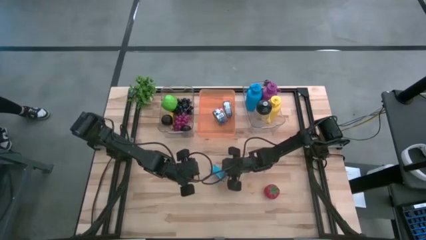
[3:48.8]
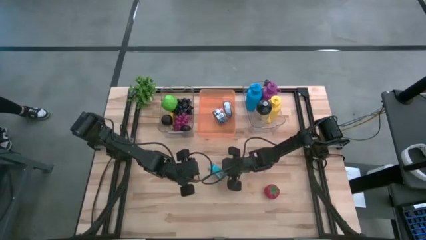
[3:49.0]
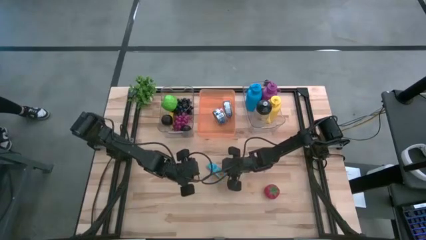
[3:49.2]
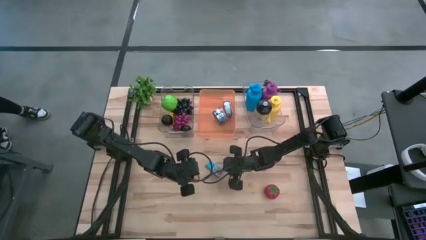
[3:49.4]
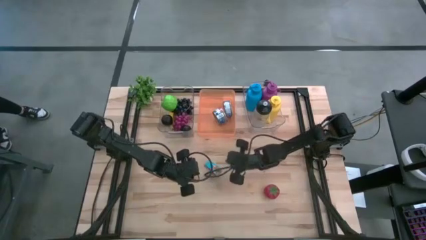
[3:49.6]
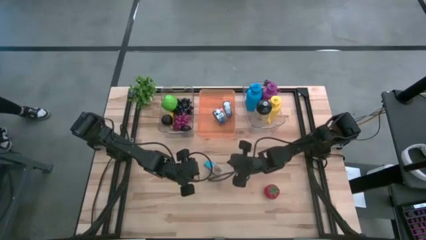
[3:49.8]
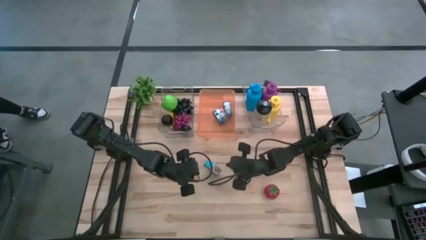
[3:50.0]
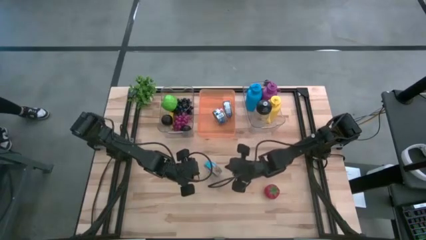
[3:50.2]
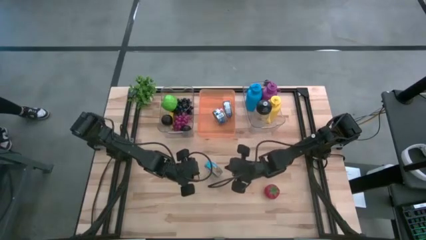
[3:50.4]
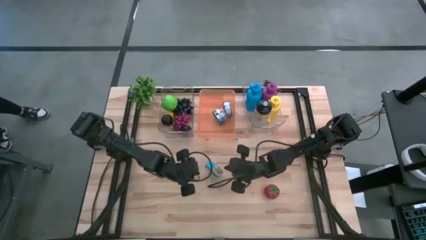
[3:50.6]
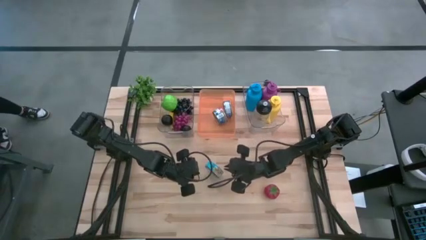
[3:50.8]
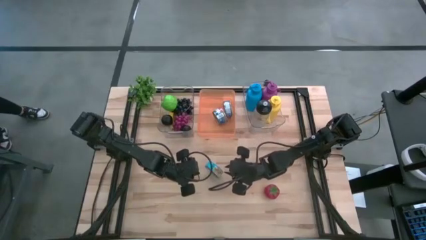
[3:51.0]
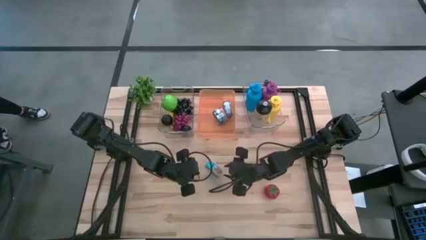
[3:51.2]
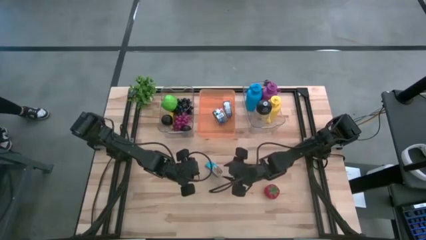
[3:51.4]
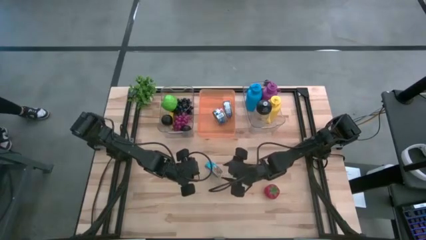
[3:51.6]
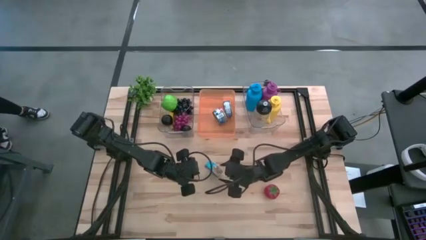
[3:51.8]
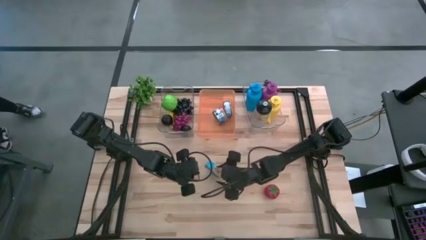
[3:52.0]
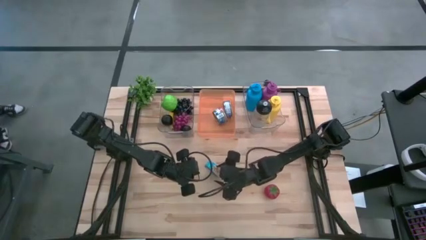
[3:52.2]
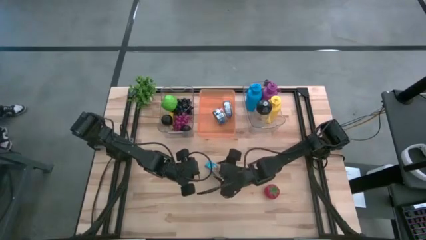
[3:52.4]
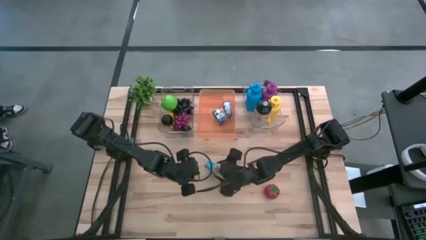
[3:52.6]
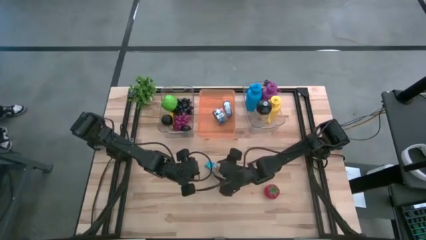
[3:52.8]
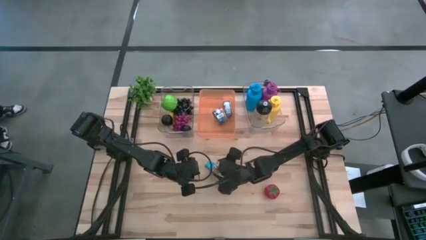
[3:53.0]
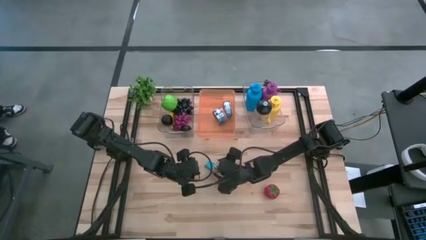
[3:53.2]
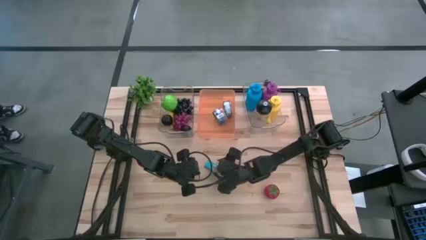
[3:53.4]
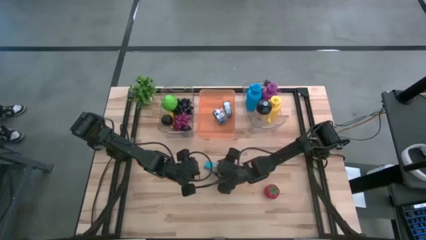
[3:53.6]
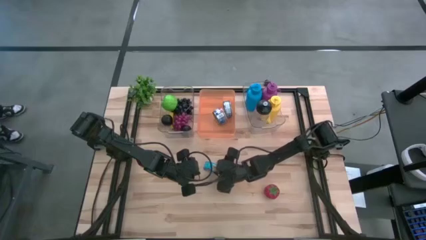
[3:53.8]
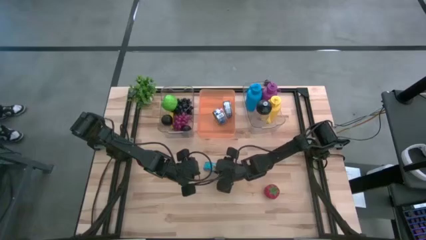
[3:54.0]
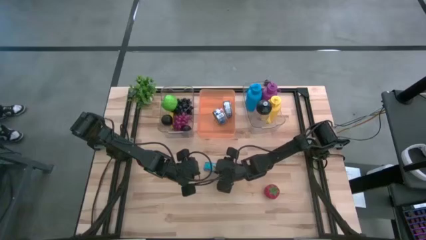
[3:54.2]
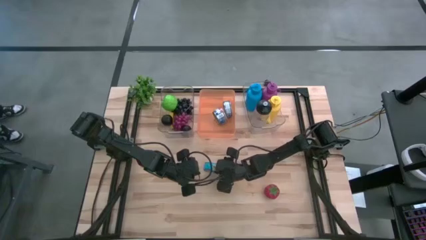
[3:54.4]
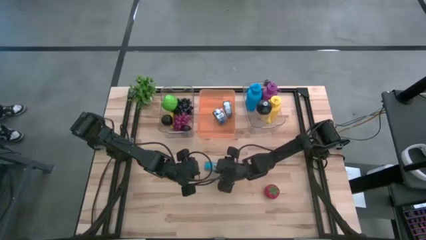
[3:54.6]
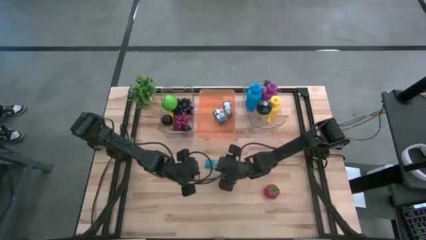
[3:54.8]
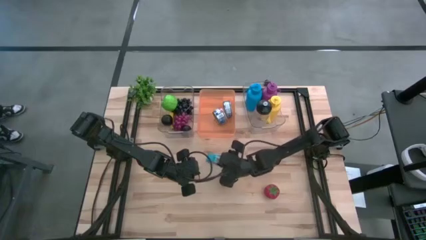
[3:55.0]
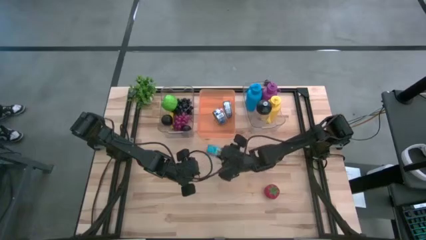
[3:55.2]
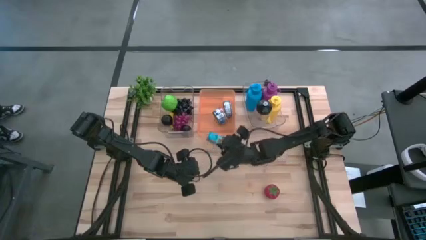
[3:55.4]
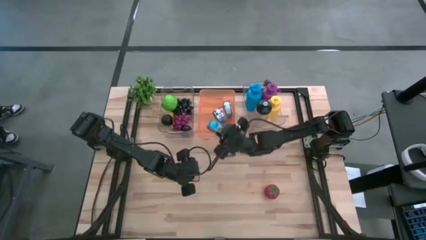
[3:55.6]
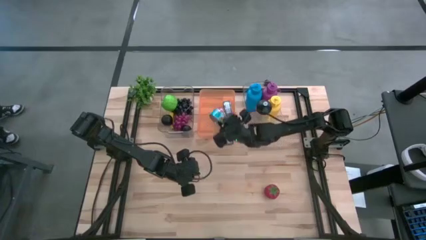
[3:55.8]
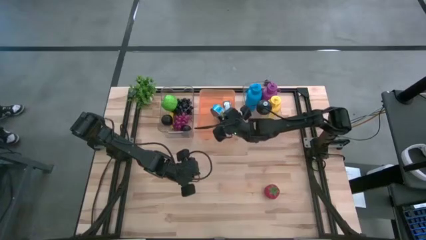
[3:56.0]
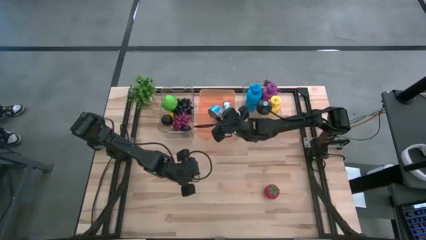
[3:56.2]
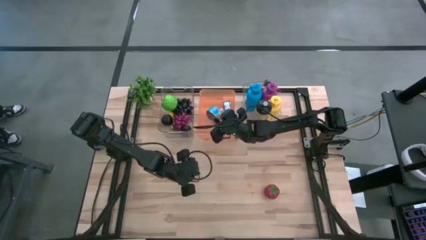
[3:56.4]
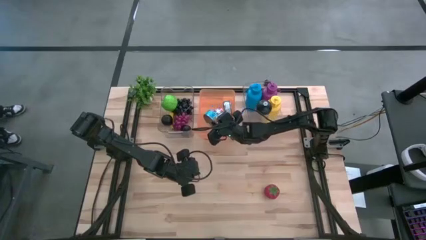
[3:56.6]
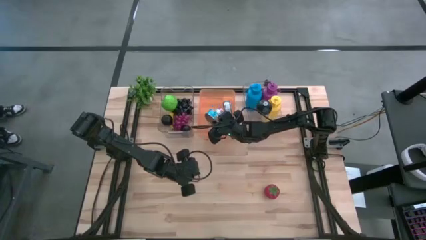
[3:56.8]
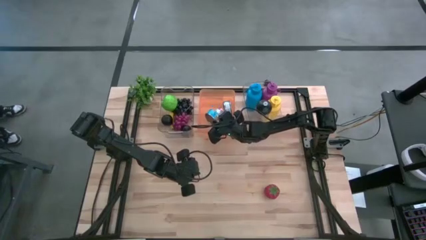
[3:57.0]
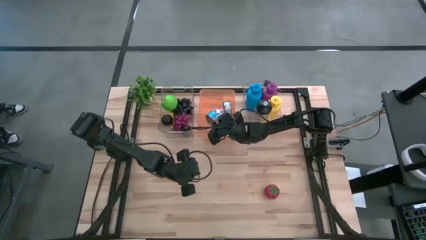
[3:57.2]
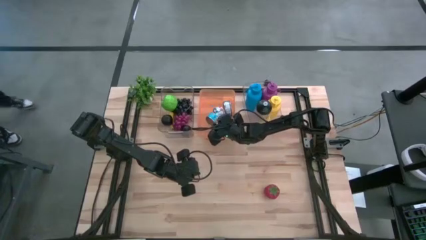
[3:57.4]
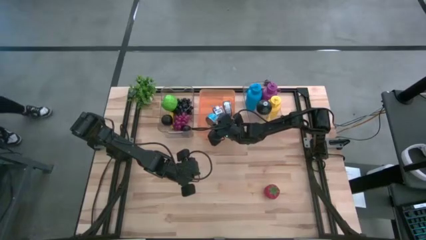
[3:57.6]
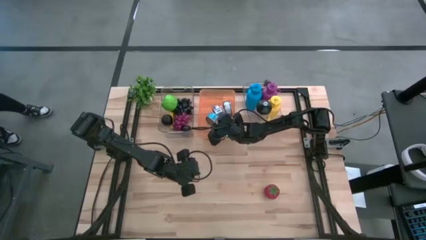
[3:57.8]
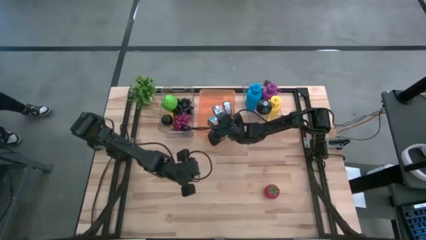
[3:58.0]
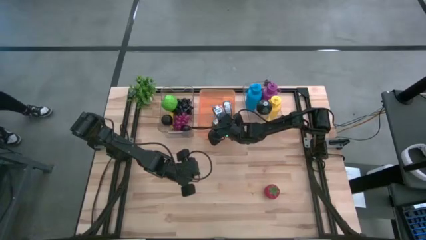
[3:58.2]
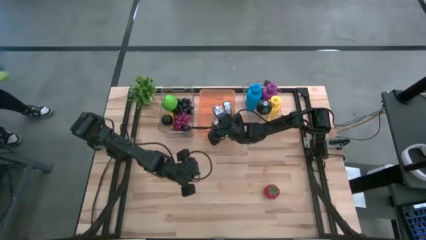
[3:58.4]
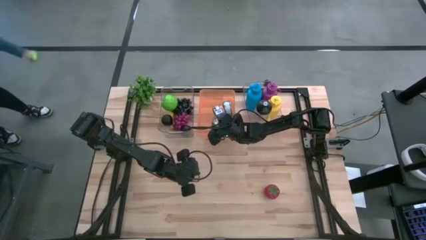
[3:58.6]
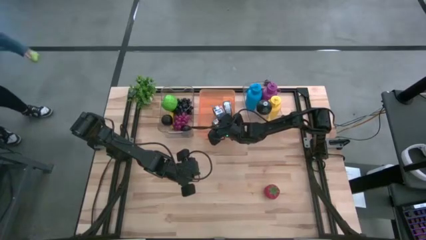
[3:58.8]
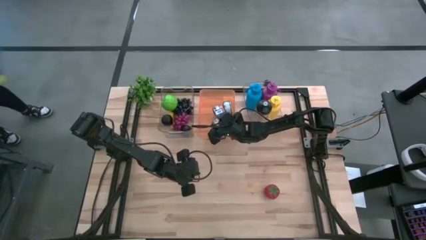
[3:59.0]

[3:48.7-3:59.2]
Task: Pick & Place Food Item
Put the yellow and blue tuna can into the orange bin

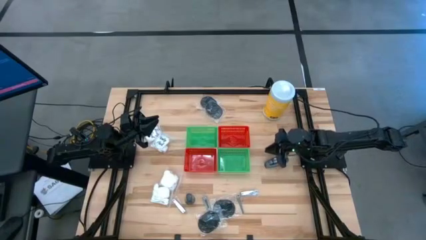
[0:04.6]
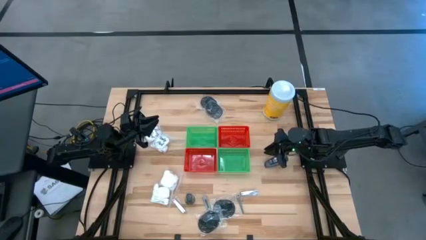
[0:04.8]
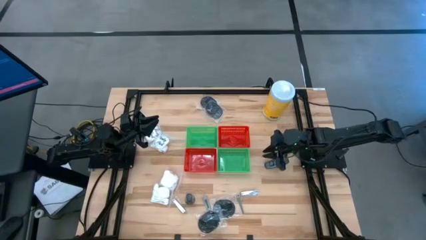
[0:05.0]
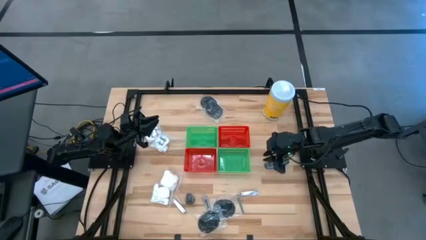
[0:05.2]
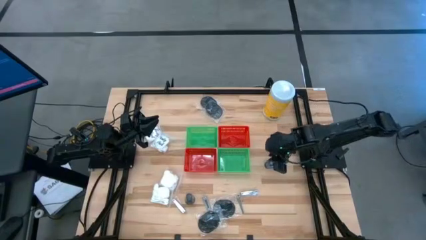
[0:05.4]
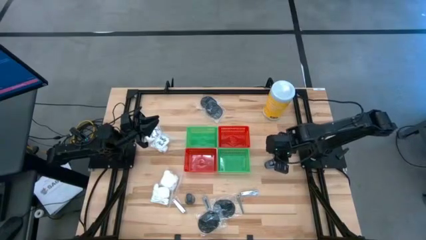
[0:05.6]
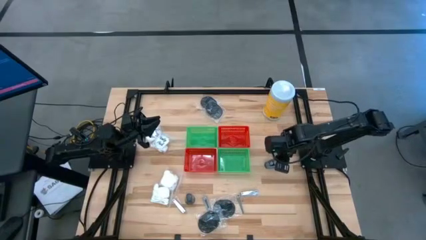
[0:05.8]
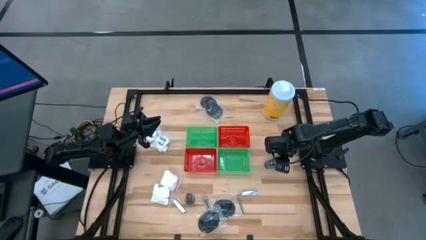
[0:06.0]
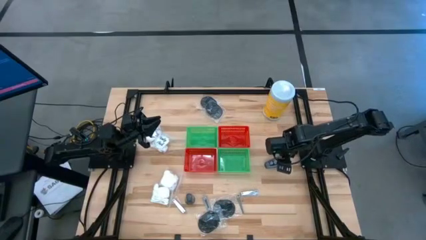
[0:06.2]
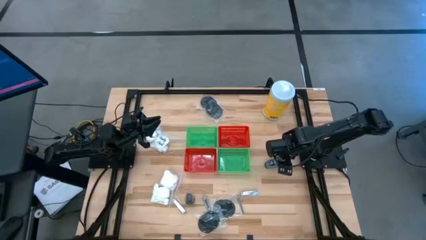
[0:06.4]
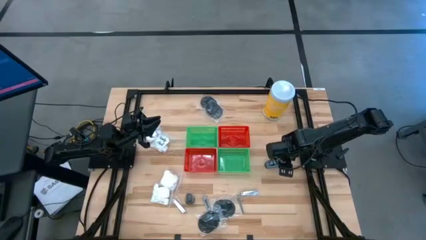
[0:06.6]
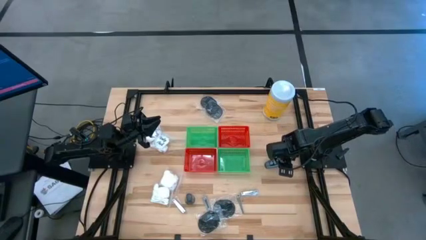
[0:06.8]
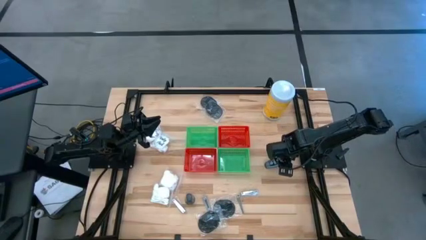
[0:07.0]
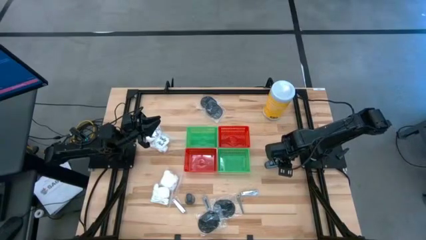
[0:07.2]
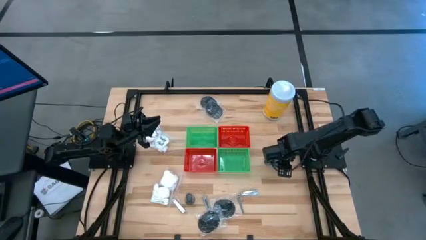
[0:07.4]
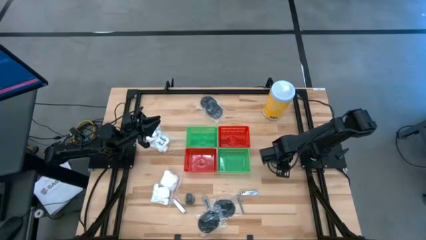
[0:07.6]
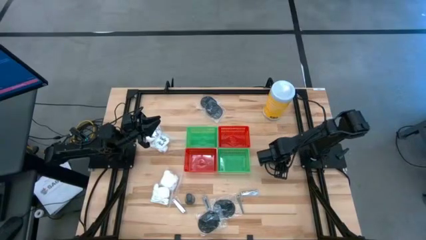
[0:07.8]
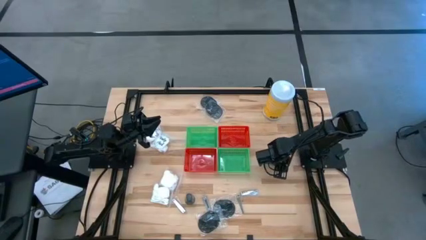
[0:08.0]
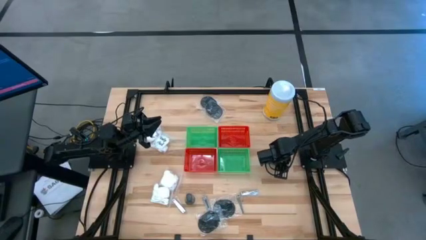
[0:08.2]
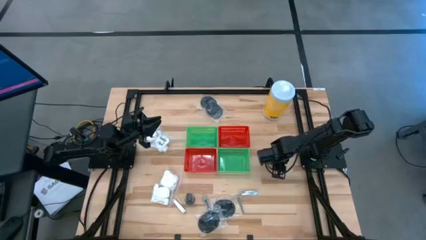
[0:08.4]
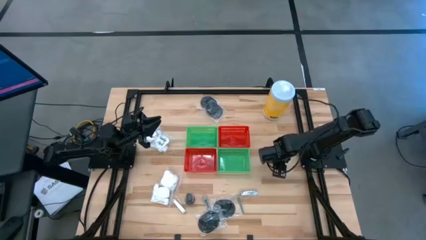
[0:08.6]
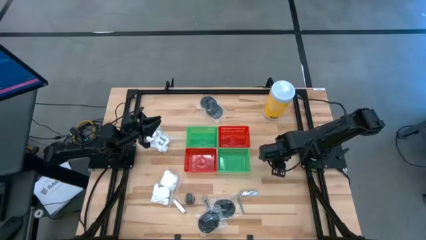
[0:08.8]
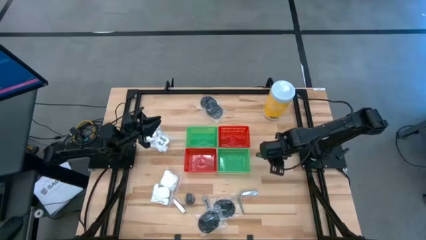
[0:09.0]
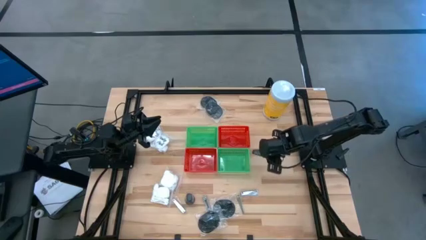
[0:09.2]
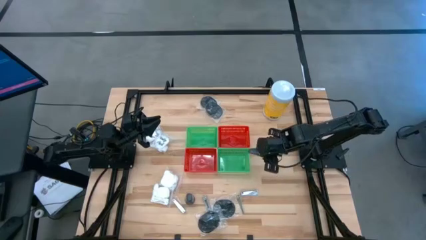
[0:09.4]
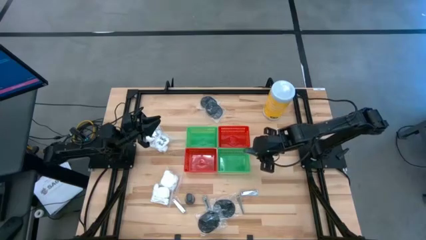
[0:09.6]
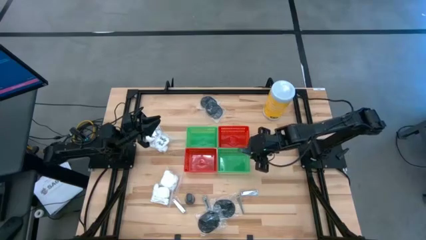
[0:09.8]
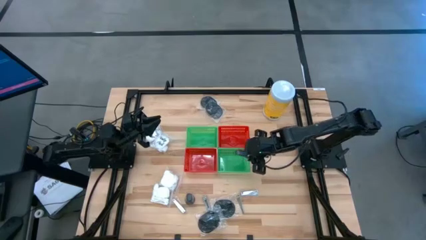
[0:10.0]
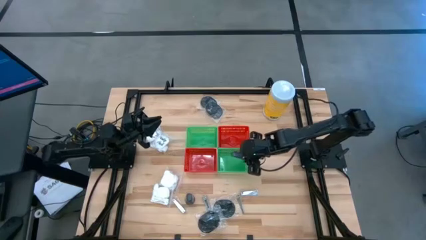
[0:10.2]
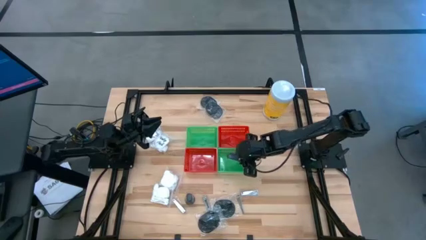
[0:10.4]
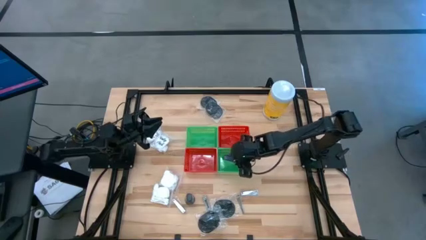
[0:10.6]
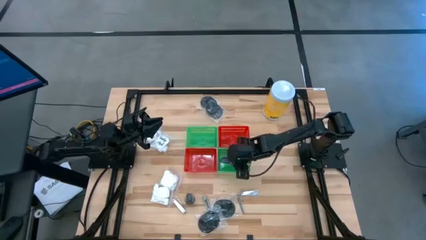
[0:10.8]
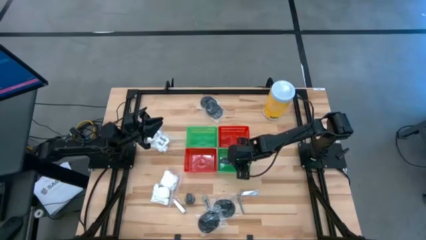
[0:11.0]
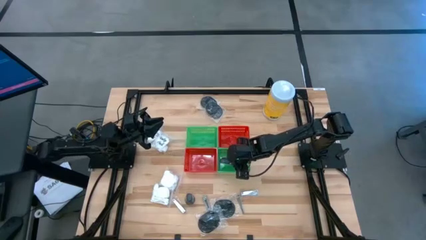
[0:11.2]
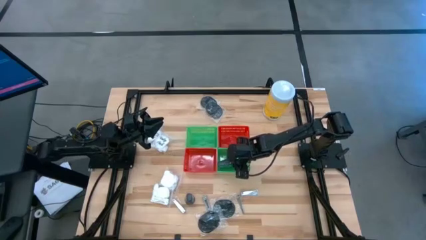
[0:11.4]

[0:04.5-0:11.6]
Task: Pick & Place Travel size toiletries
Put the dark gray deodorant into the right green basket
